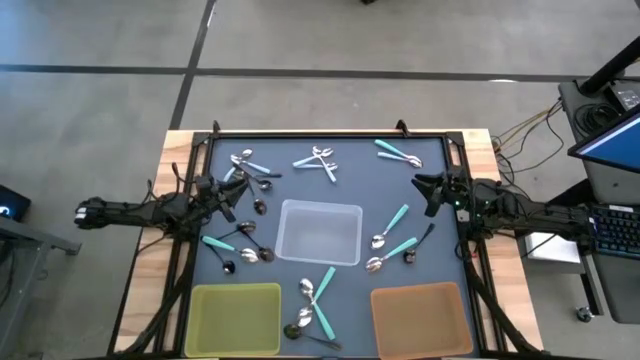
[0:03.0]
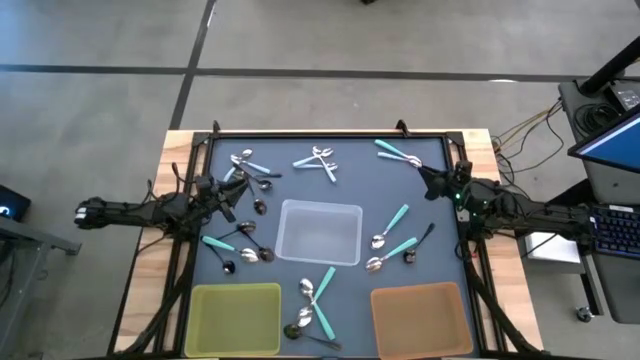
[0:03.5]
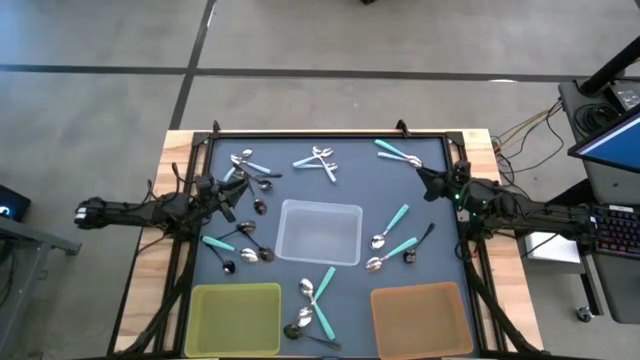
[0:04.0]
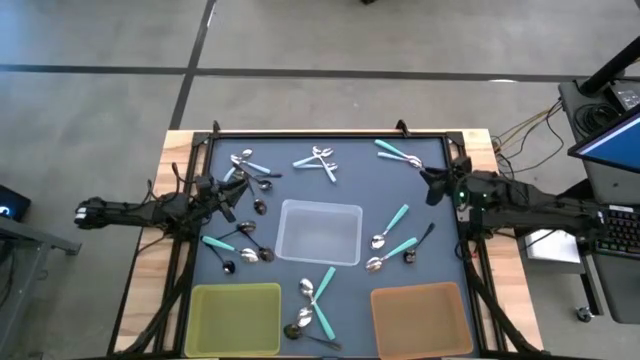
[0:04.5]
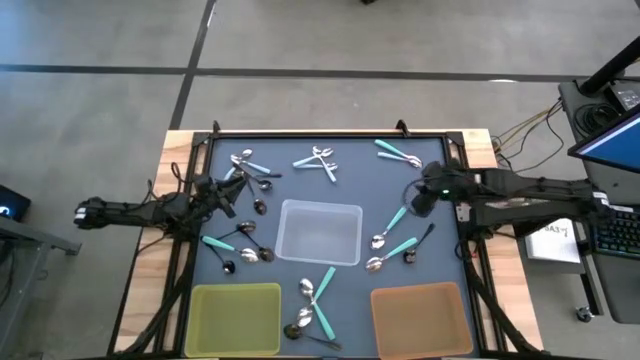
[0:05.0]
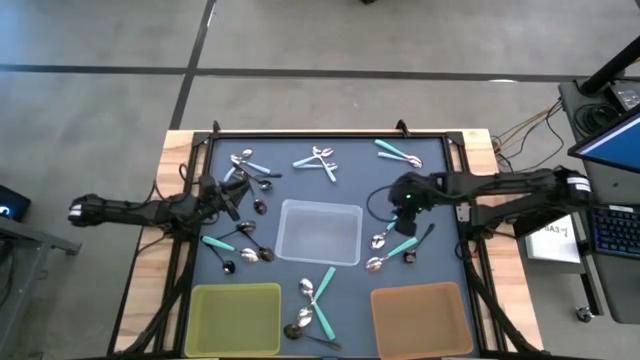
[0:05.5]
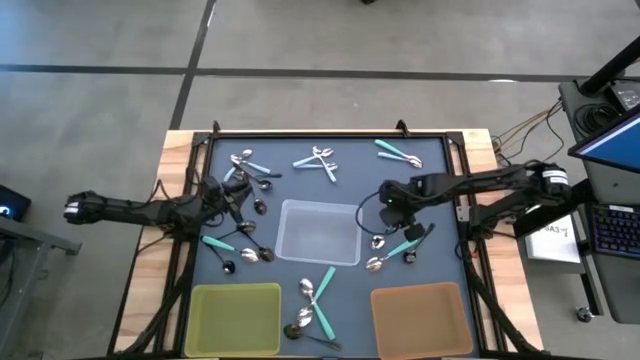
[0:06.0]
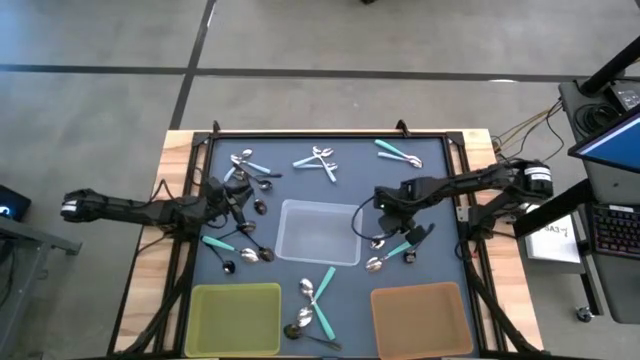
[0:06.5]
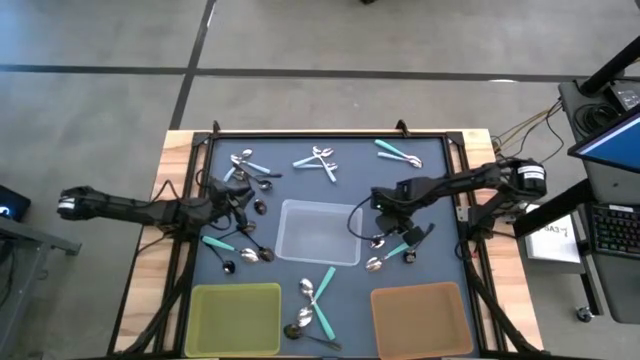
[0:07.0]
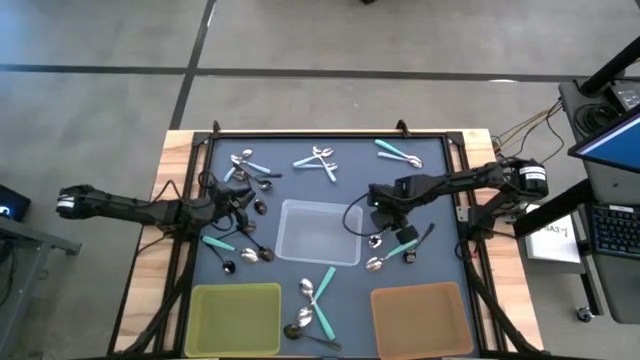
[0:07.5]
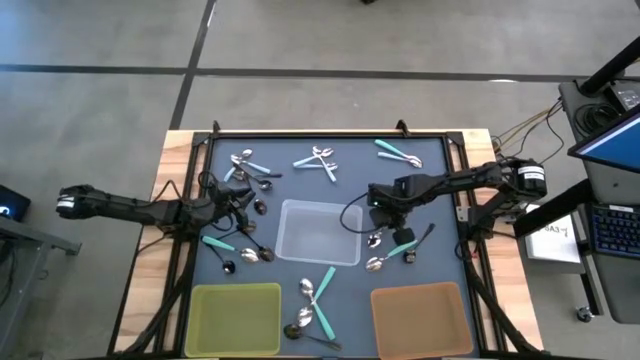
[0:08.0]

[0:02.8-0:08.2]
Task: Sort silverware by color (type)
Put the green spoon into the transparent bin

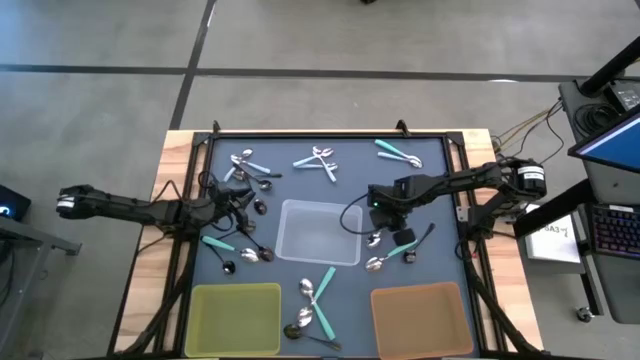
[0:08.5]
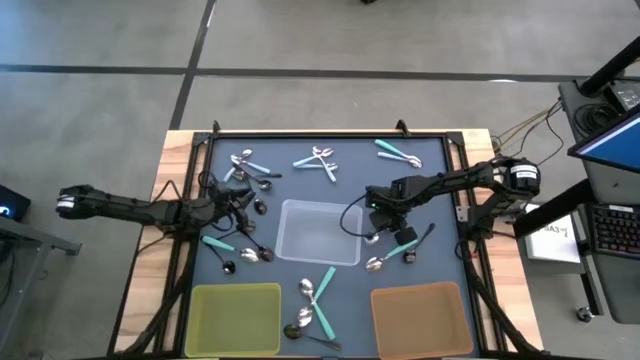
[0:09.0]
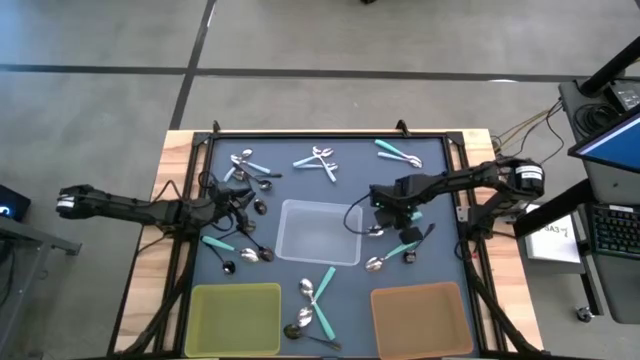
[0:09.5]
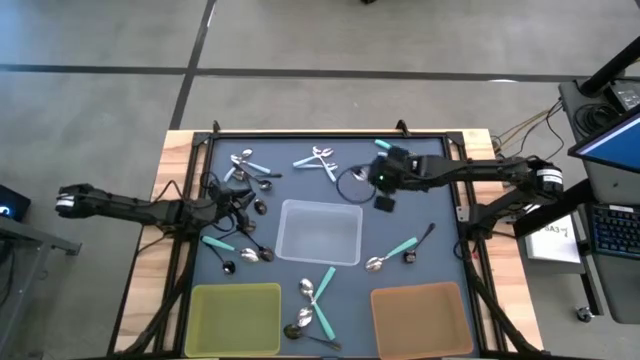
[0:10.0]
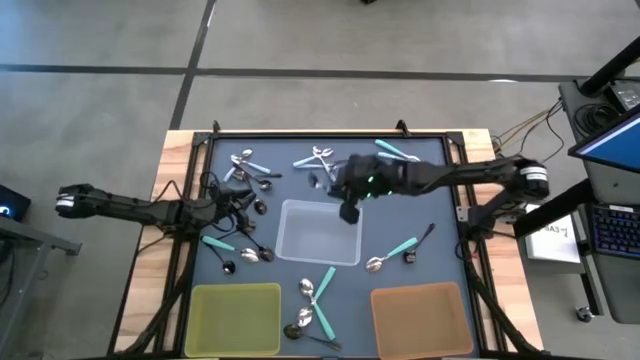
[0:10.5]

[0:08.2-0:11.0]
Put the green spoon into the transparent bin

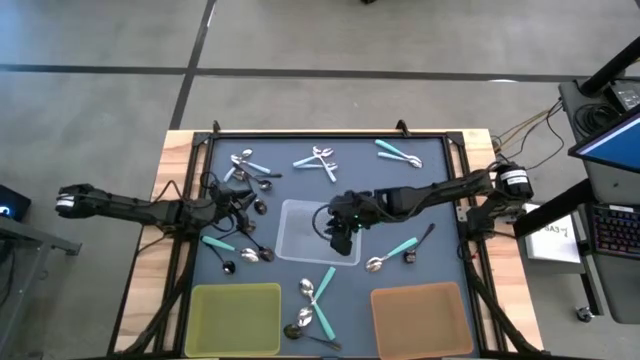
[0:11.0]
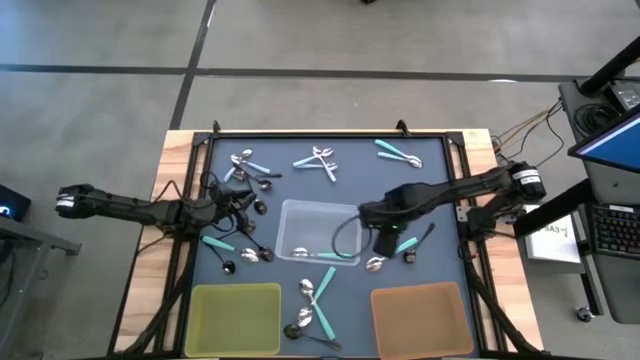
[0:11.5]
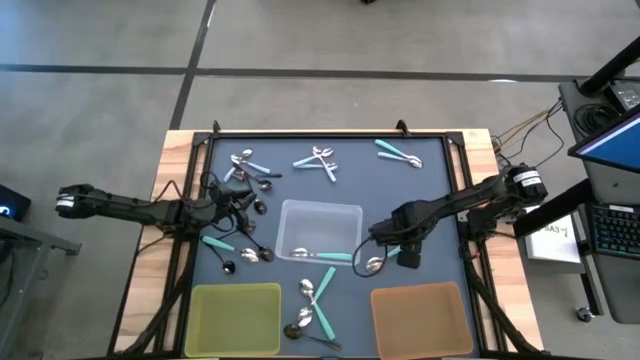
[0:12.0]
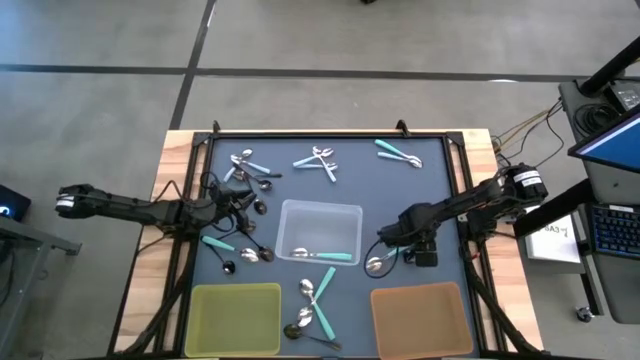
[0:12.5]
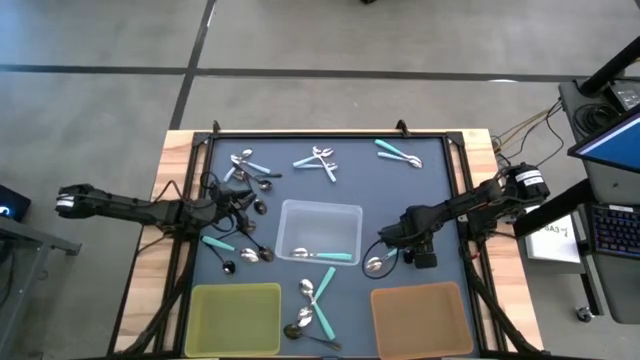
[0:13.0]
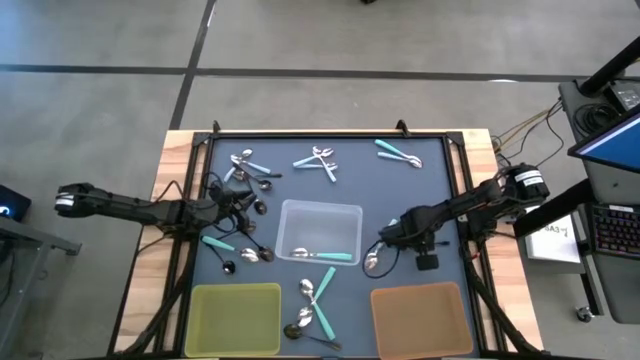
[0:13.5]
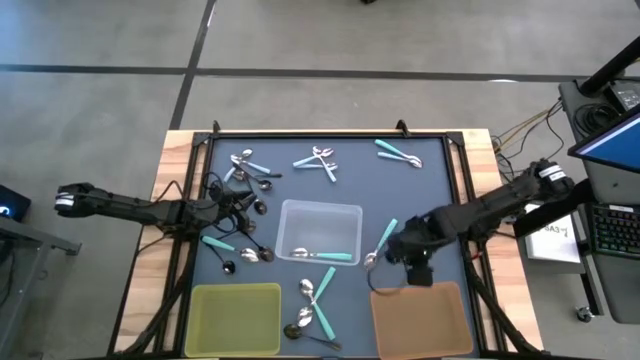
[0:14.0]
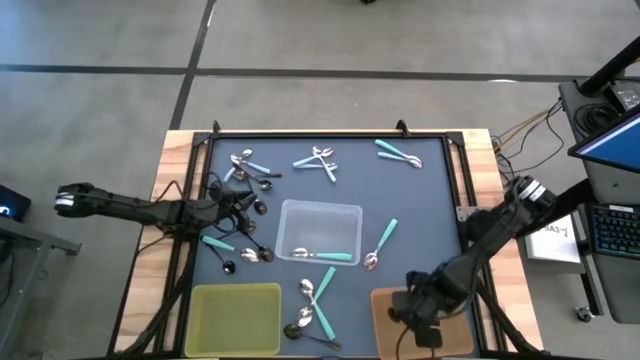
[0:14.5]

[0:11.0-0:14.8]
Put the black spoon into the orange bin

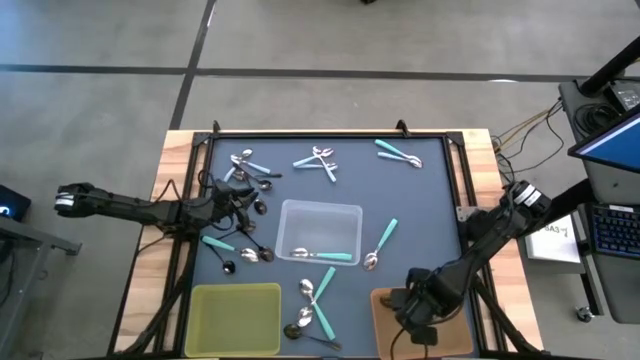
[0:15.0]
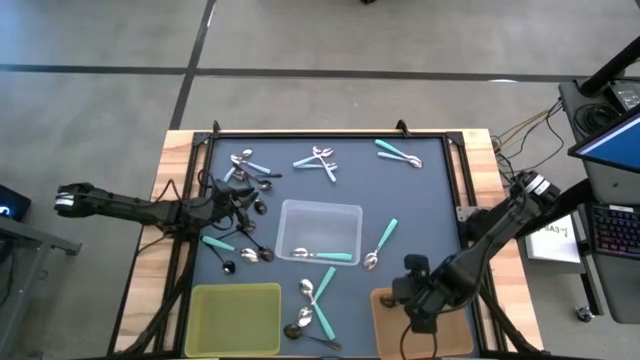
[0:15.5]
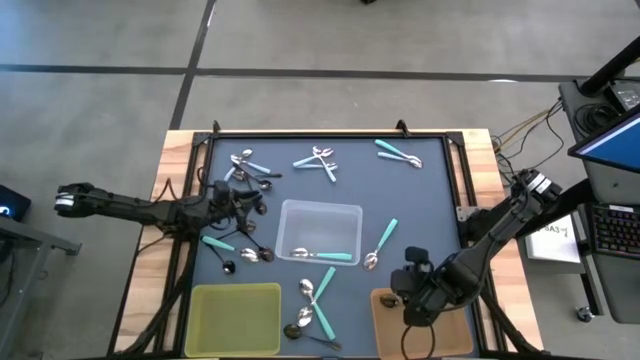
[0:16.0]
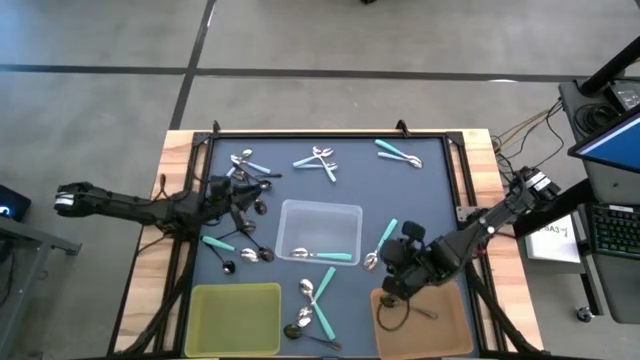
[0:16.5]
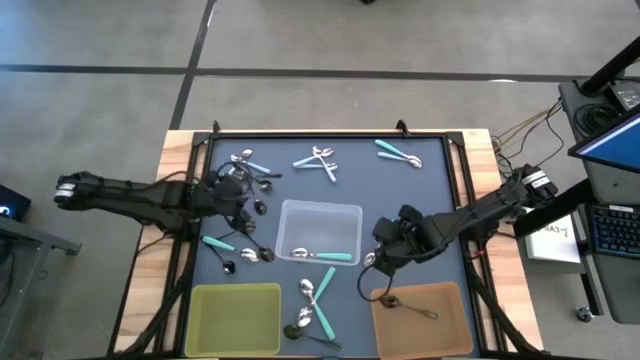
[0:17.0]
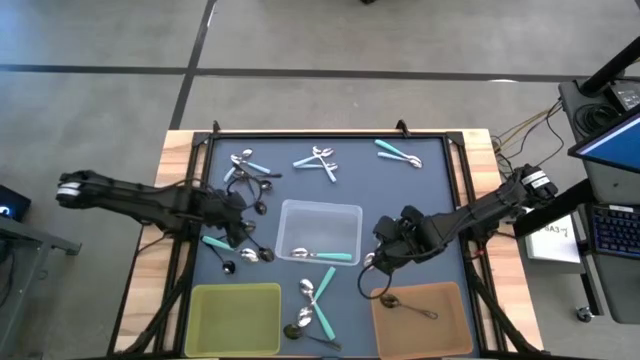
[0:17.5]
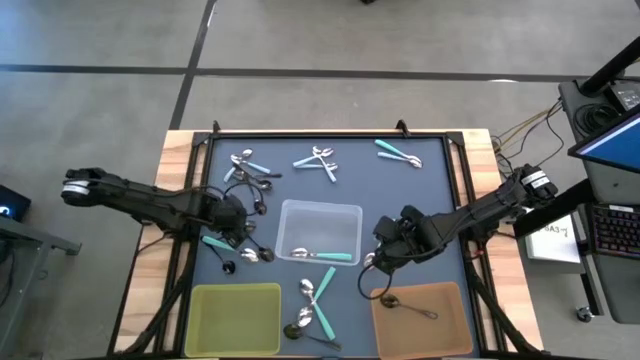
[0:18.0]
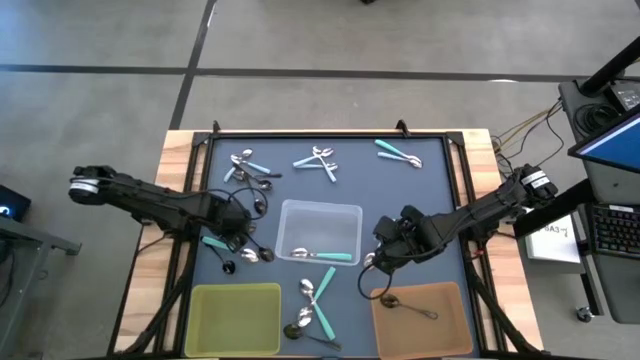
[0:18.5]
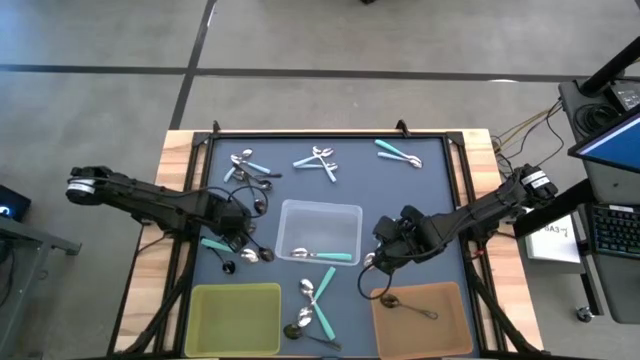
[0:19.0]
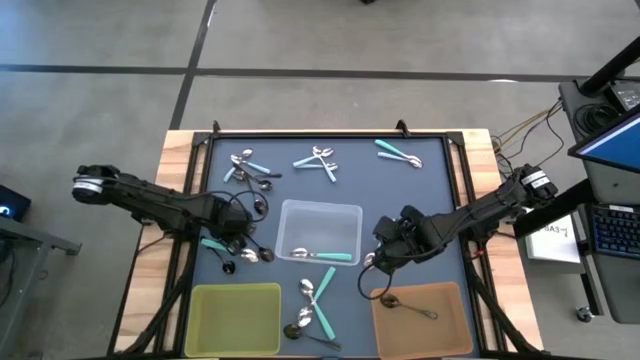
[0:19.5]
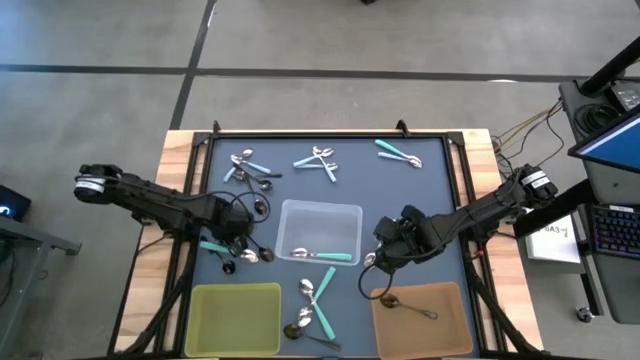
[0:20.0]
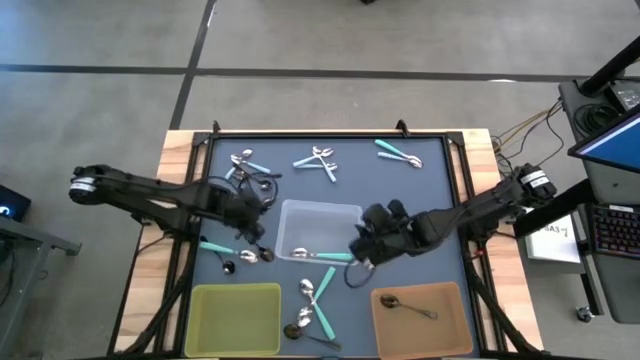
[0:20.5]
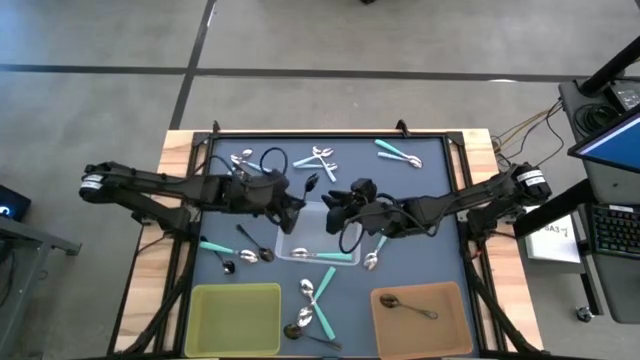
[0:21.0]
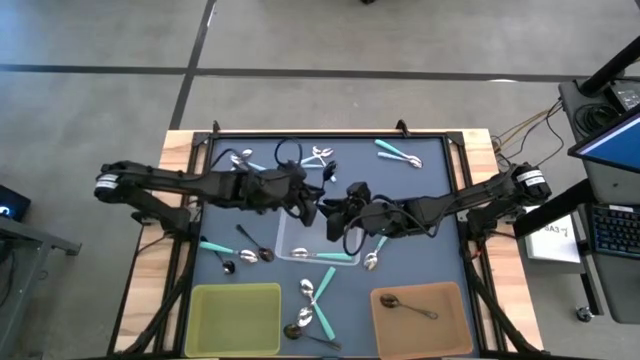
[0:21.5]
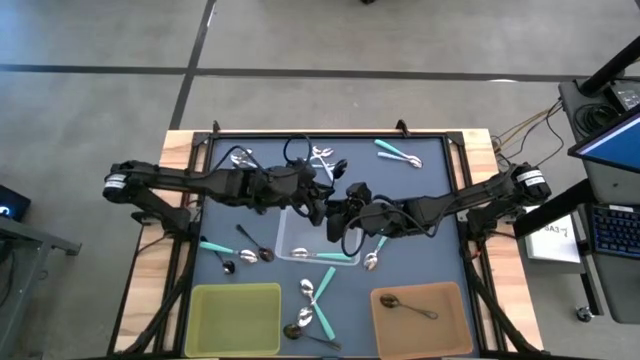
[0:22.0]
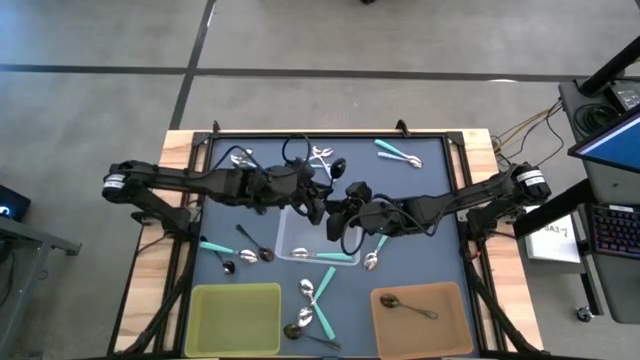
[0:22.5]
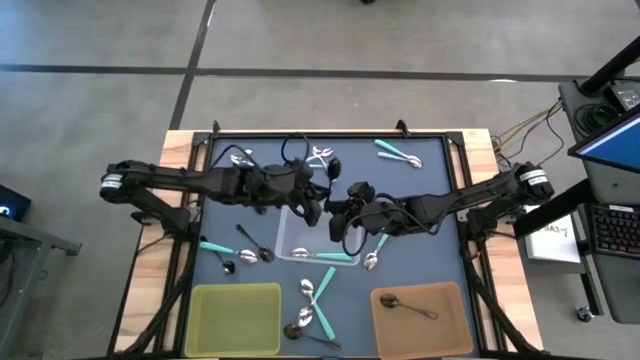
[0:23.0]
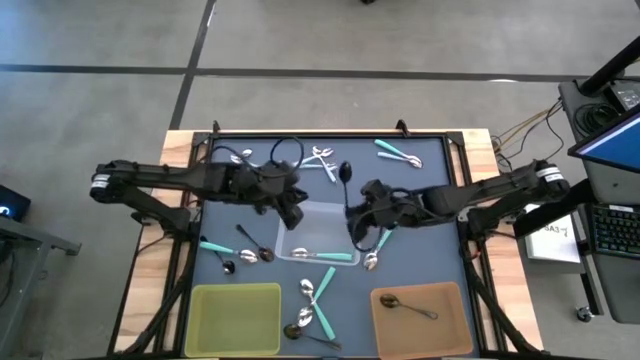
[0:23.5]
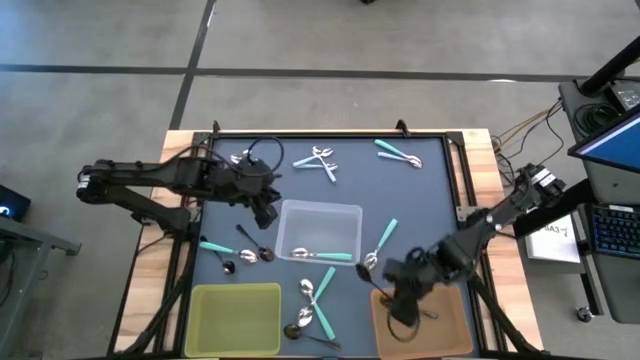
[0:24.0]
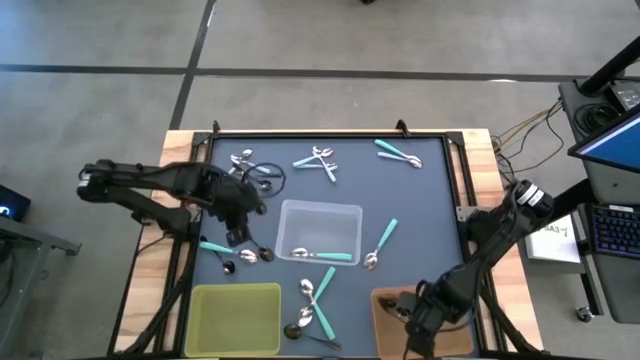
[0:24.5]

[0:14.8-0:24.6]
Put the black spoon into the orange bin
